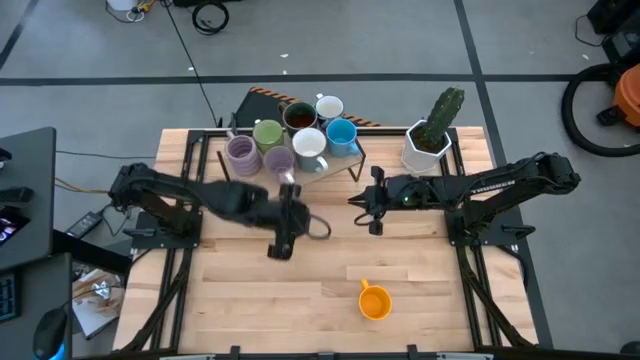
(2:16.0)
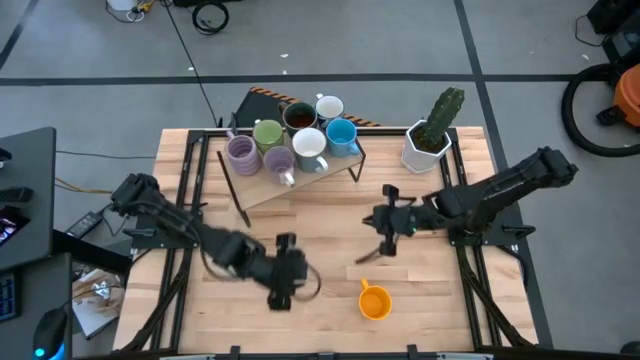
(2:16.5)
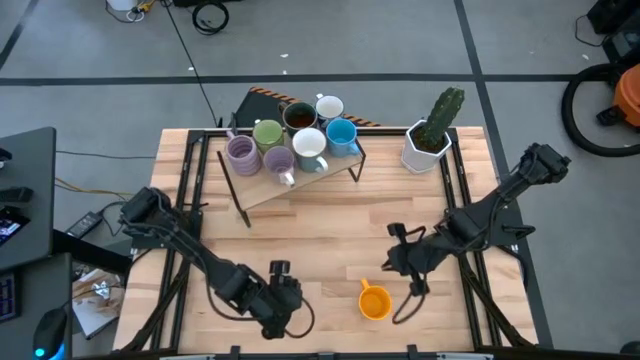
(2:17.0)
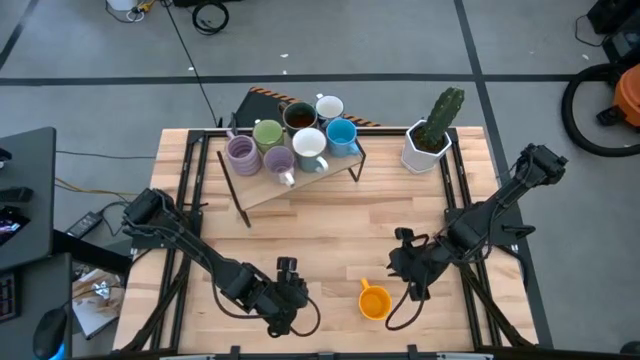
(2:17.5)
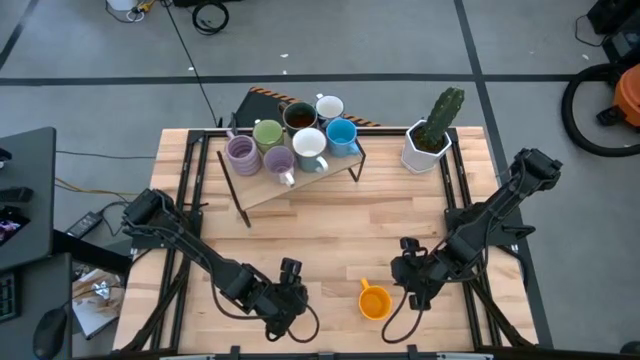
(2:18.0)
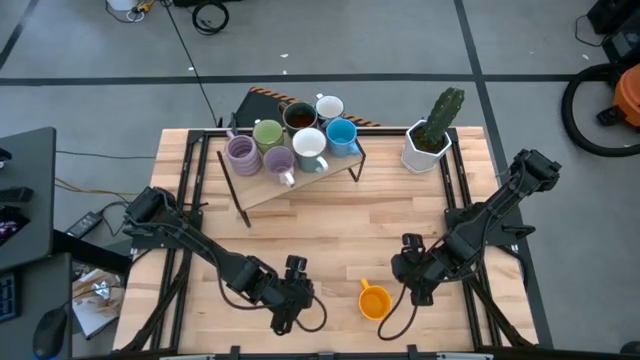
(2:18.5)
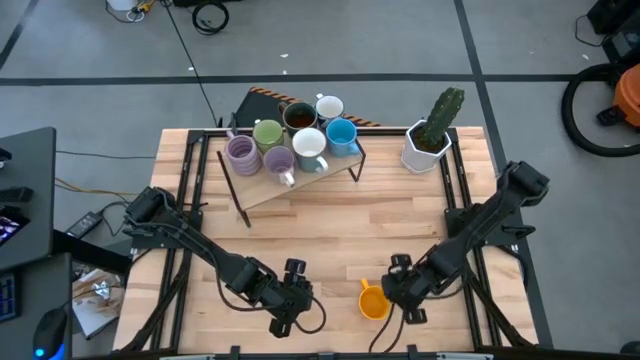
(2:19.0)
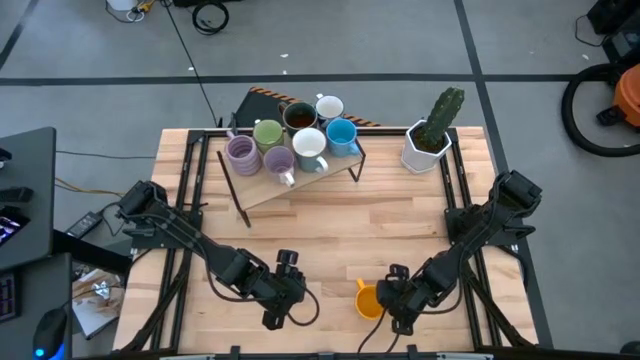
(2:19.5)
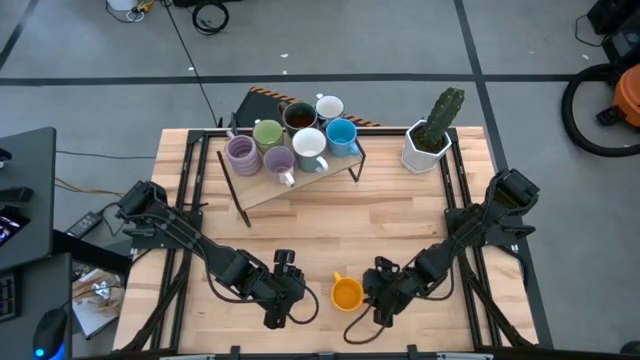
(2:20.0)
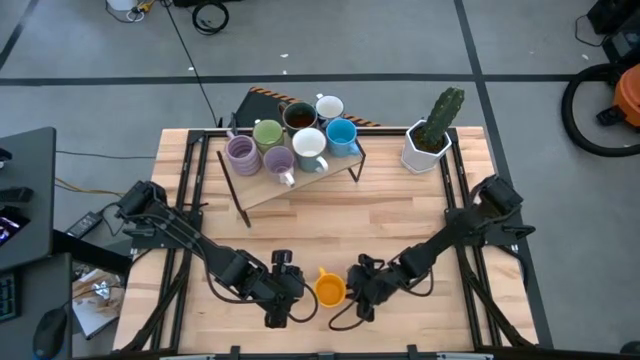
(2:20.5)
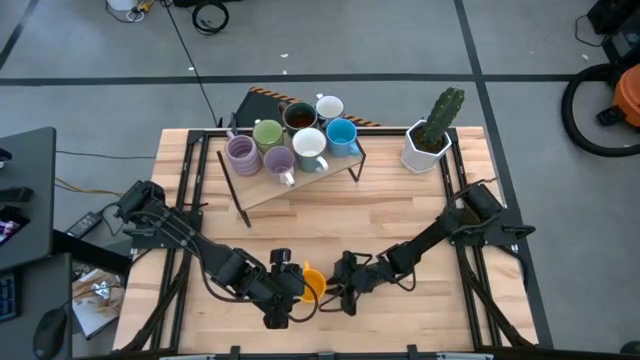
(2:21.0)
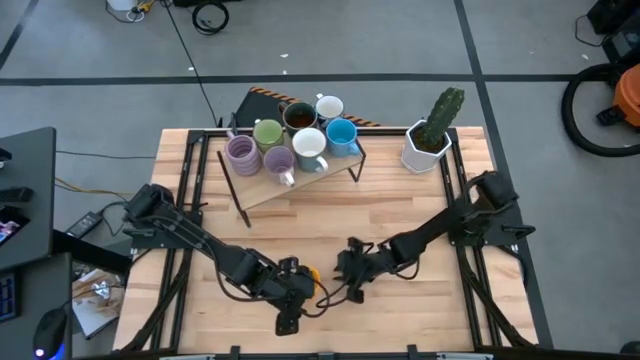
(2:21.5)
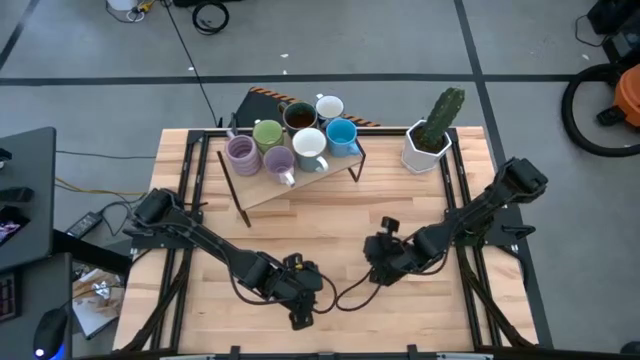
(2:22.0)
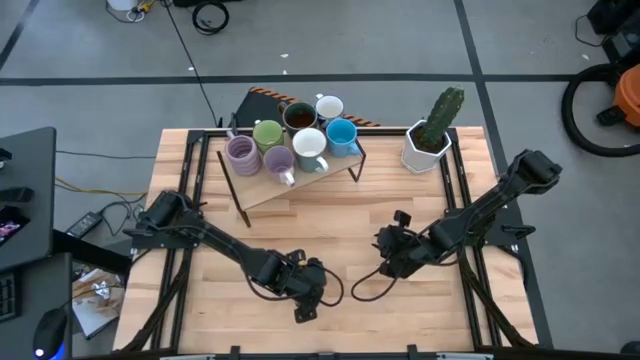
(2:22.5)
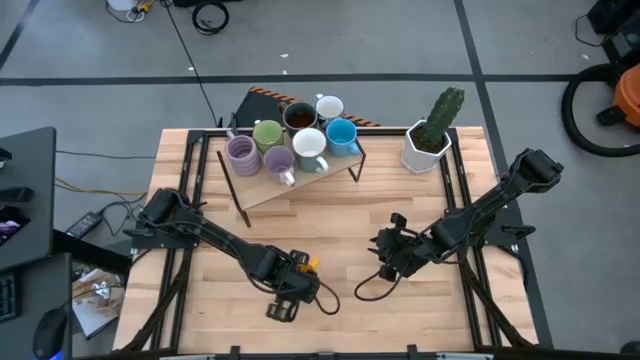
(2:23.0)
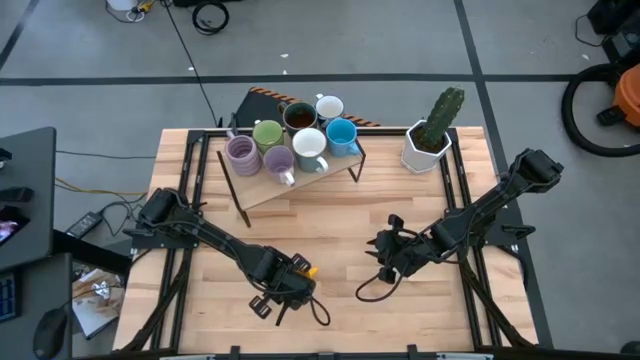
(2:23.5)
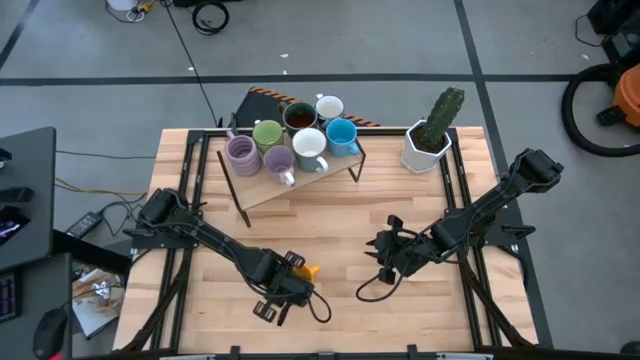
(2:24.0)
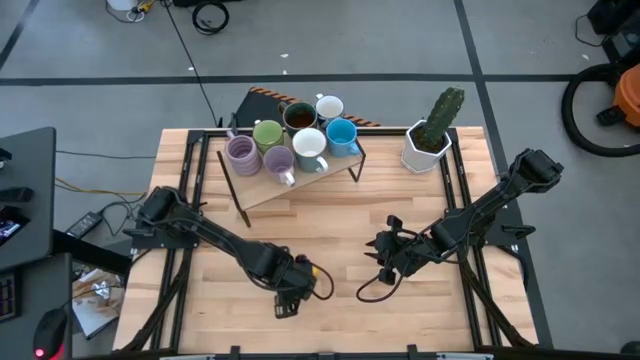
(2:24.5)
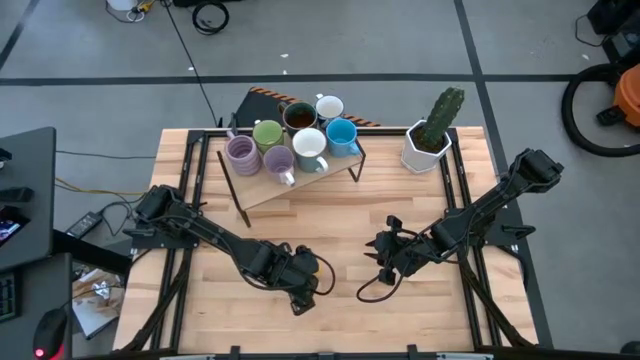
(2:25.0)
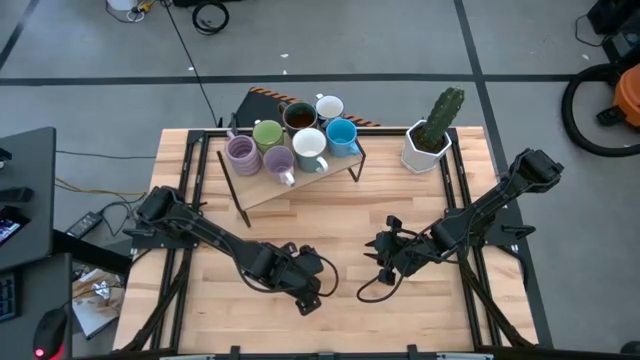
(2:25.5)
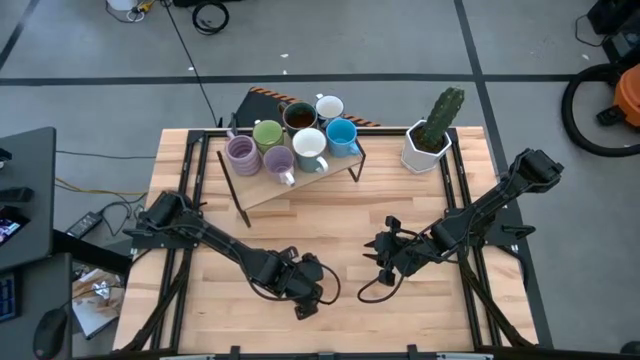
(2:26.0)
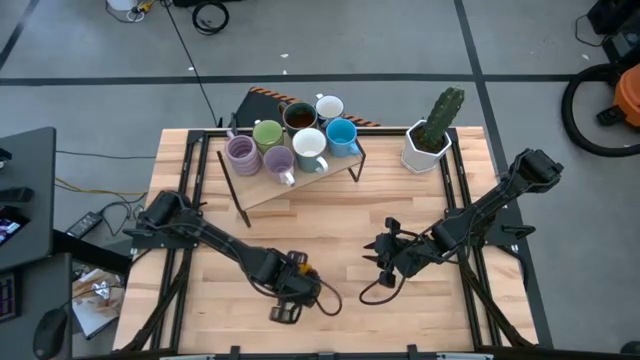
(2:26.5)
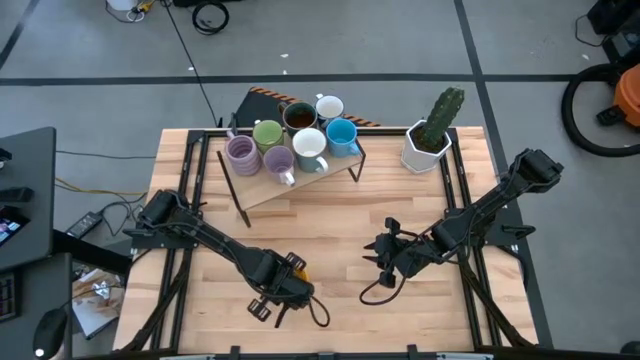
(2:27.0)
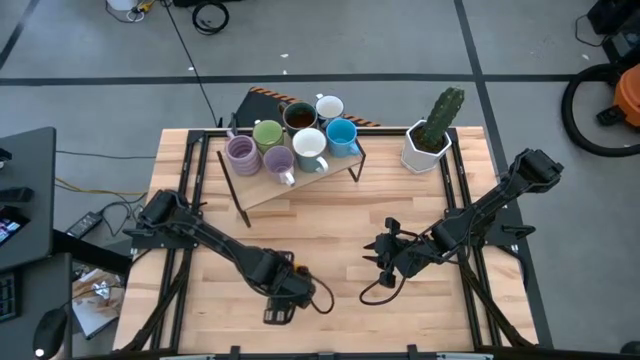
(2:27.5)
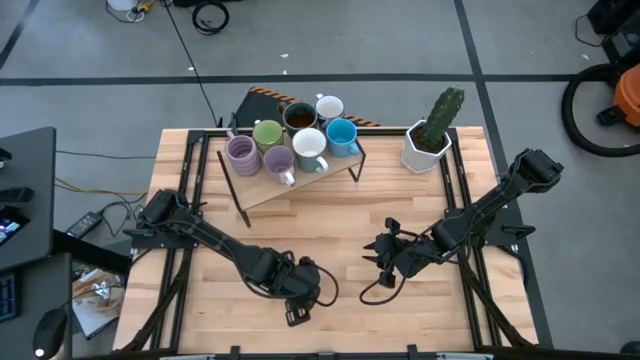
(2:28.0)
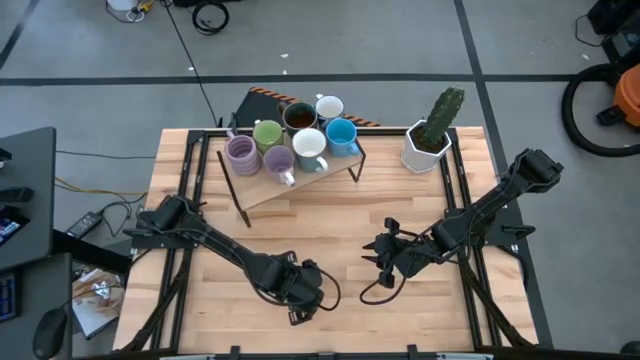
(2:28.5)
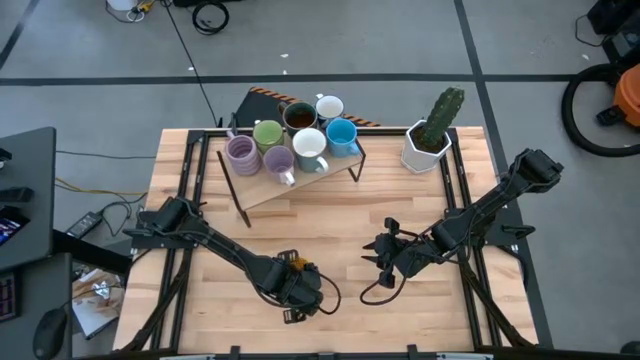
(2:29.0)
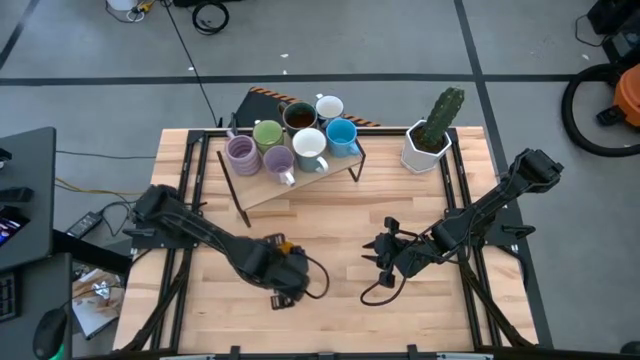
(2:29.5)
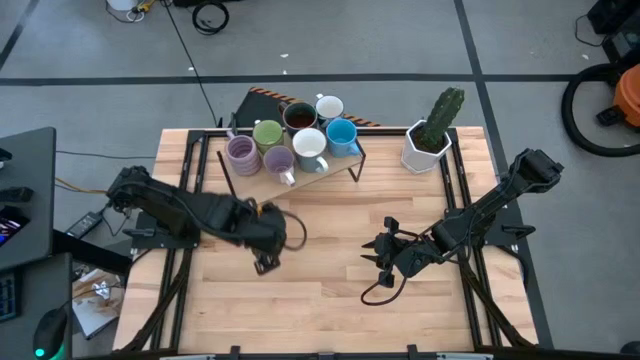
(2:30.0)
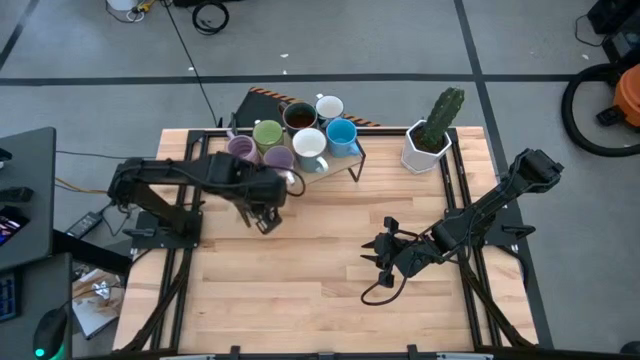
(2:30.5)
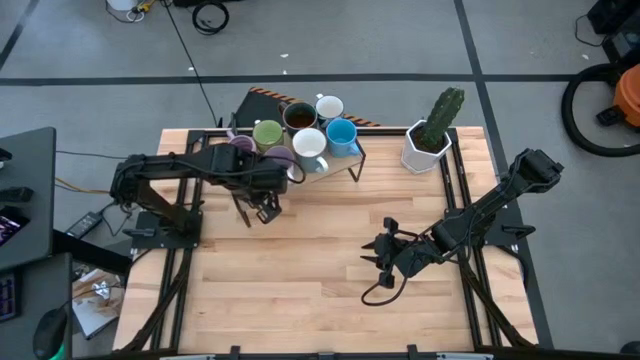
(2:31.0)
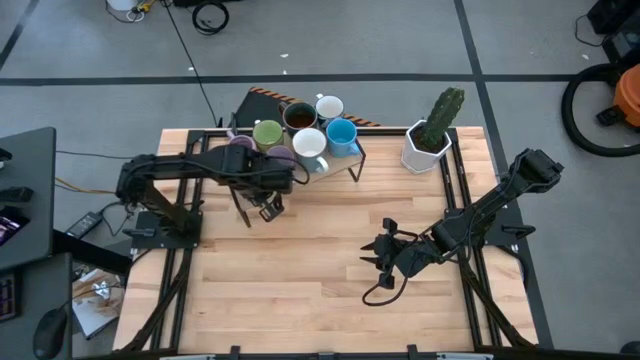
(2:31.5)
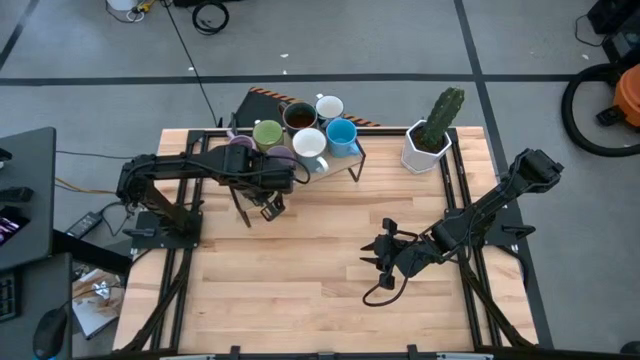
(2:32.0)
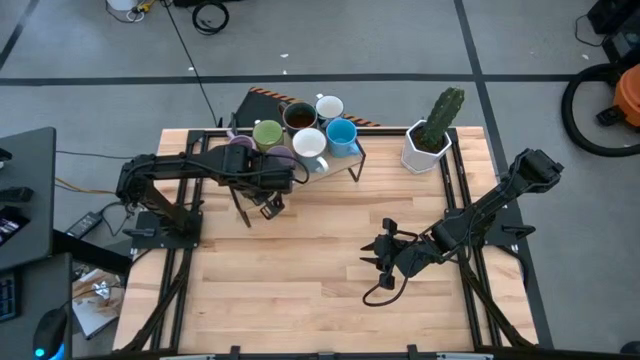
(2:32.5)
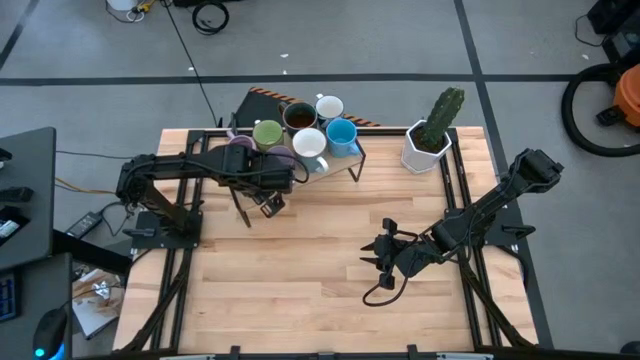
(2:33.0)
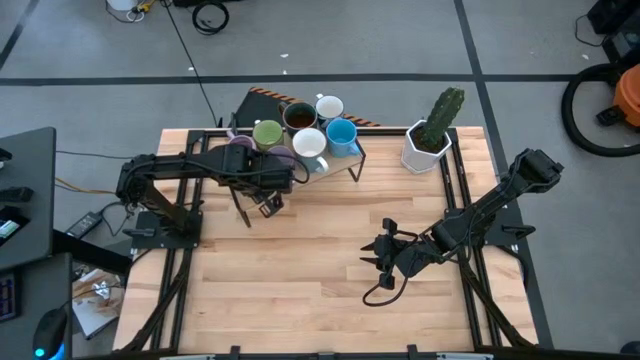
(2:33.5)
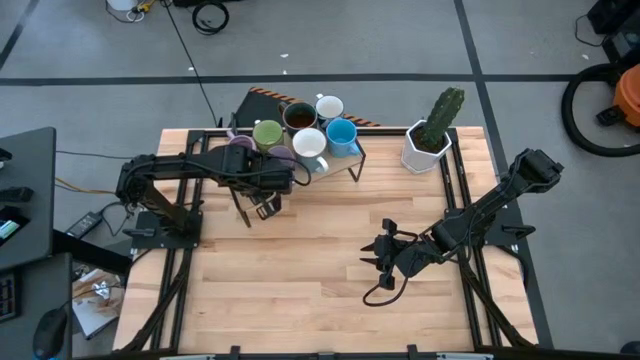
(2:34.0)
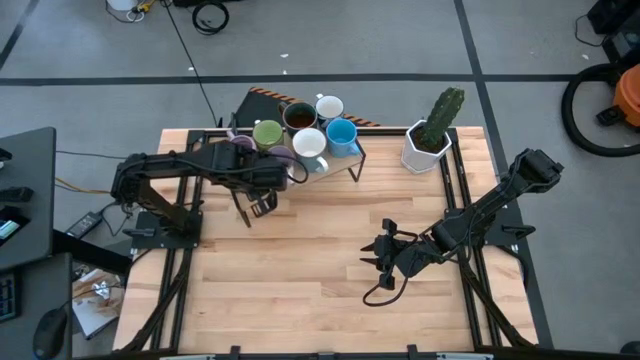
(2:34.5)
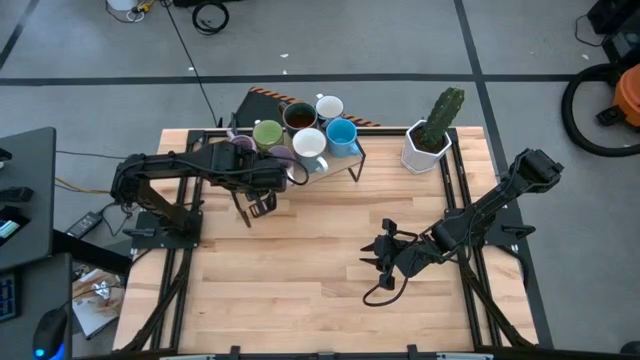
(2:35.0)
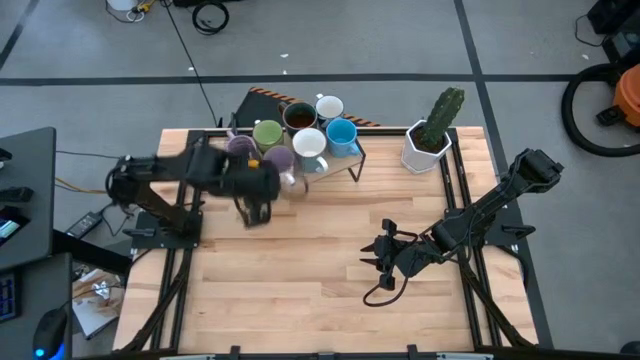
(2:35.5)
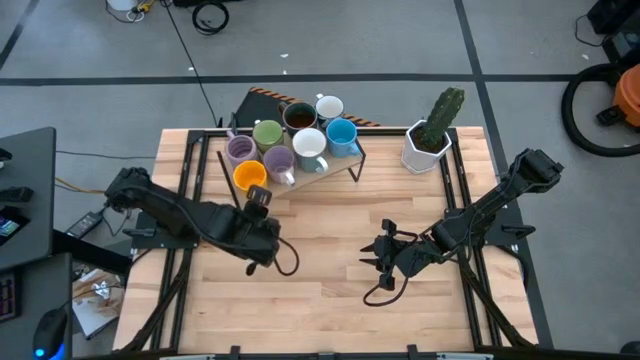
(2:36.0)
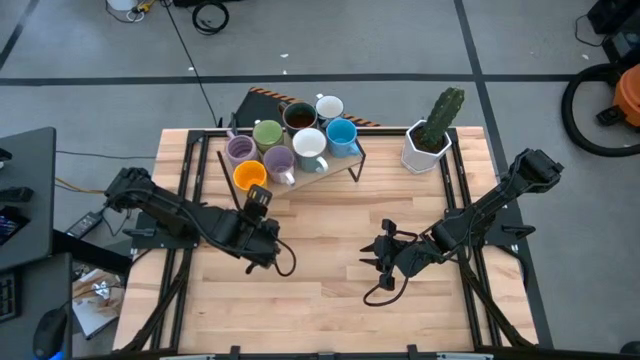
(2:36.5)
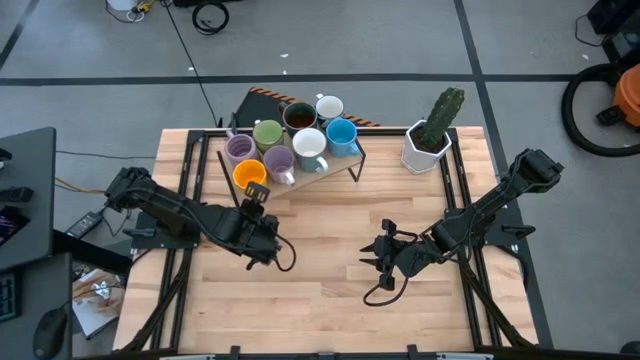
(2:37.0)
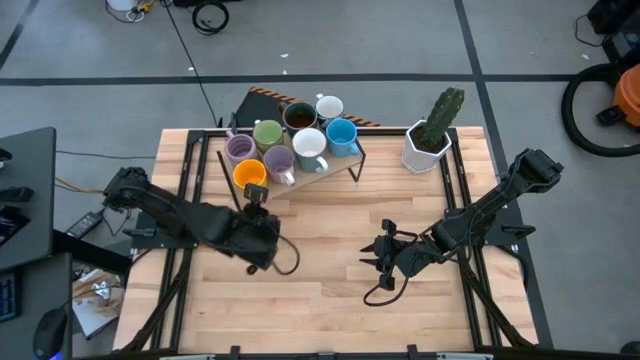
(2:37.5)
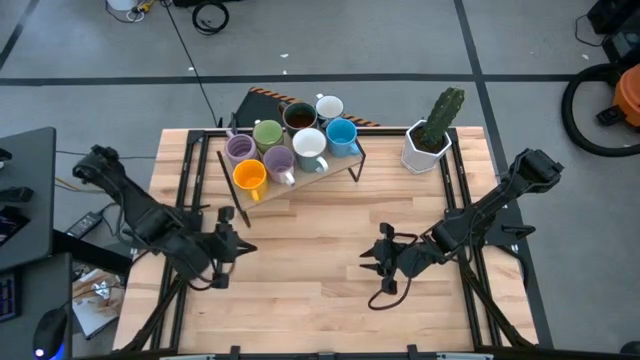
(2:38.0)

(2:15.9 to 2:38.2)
Task: Place coffee mugs
Put the yellow mug on the shelf
